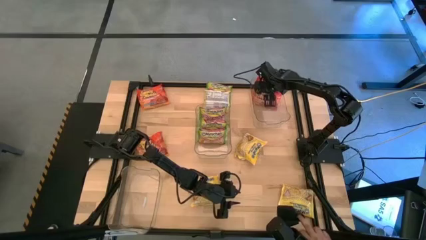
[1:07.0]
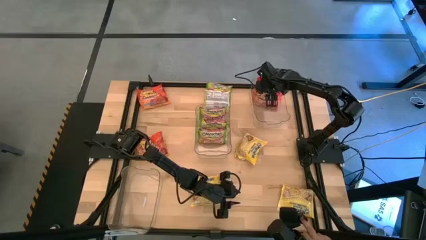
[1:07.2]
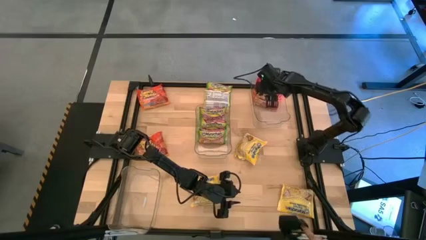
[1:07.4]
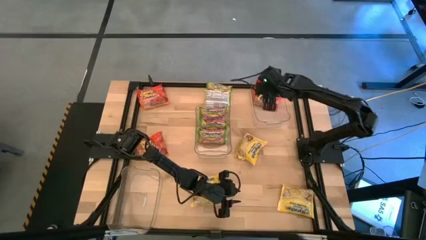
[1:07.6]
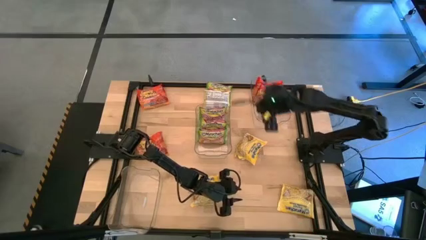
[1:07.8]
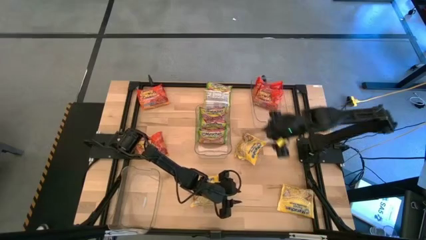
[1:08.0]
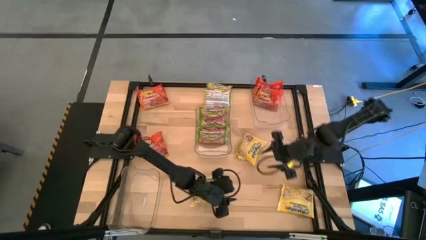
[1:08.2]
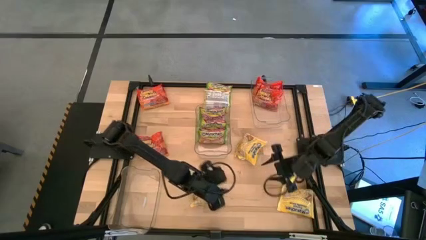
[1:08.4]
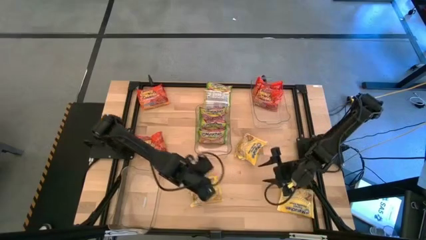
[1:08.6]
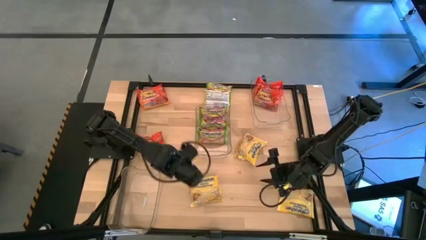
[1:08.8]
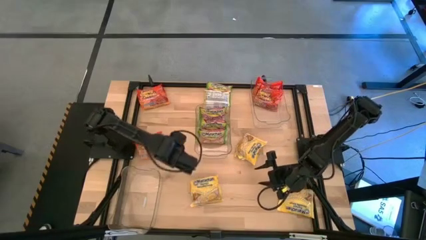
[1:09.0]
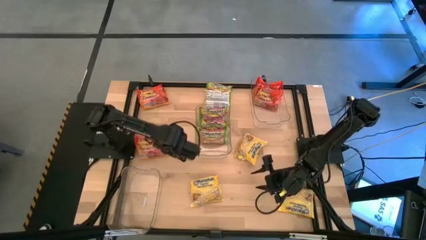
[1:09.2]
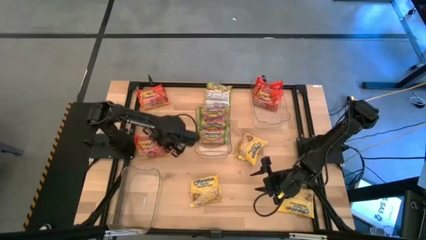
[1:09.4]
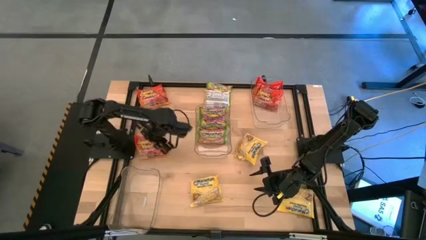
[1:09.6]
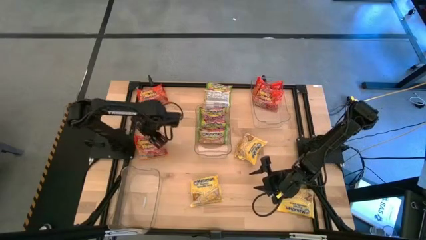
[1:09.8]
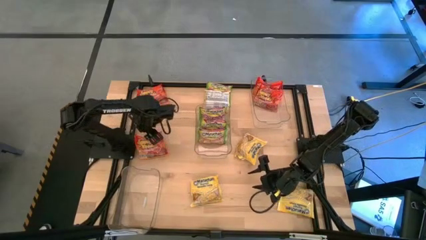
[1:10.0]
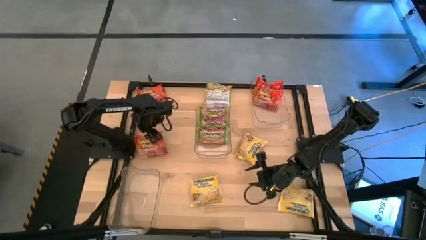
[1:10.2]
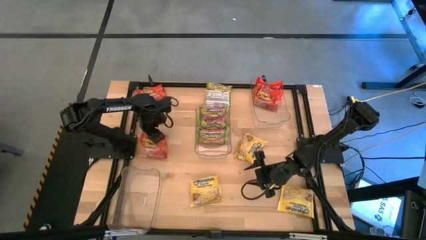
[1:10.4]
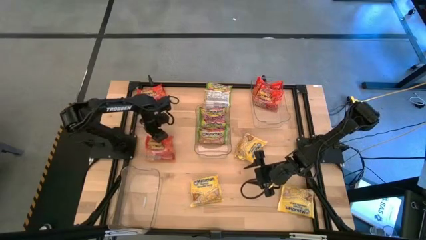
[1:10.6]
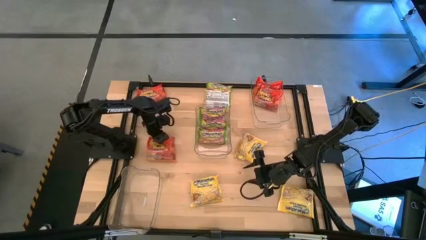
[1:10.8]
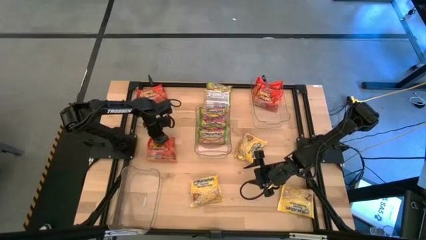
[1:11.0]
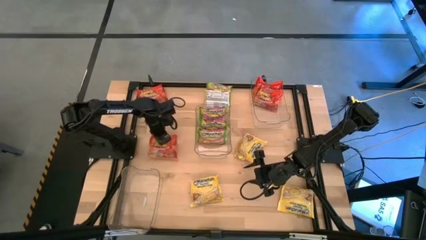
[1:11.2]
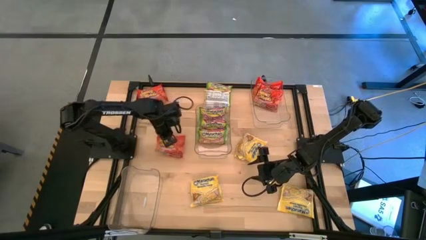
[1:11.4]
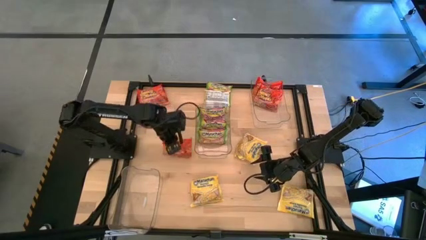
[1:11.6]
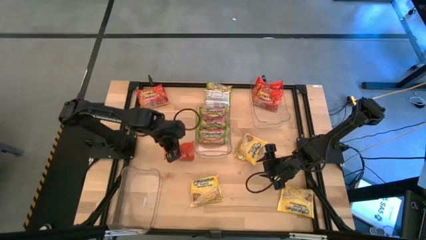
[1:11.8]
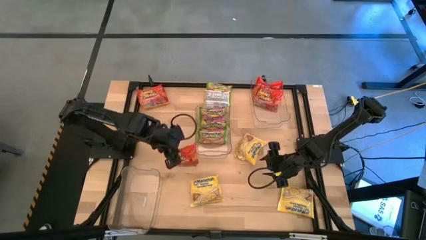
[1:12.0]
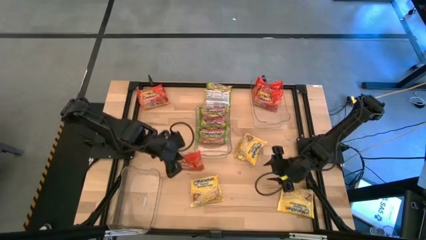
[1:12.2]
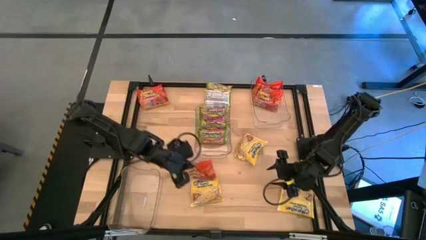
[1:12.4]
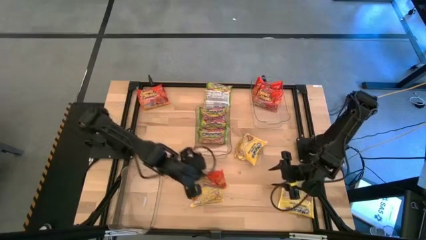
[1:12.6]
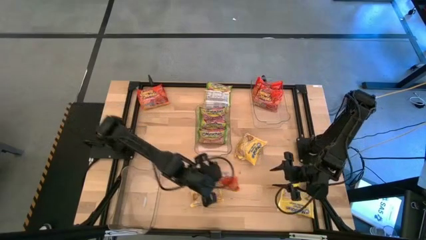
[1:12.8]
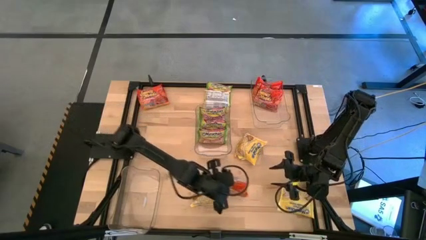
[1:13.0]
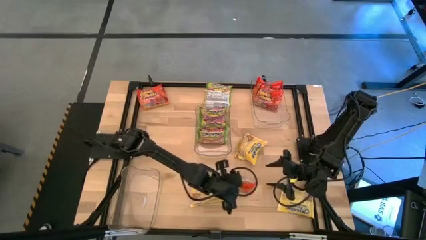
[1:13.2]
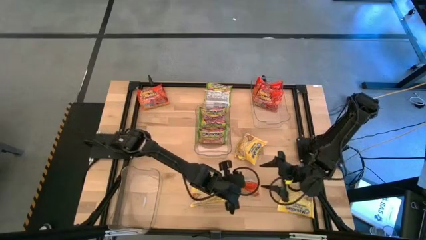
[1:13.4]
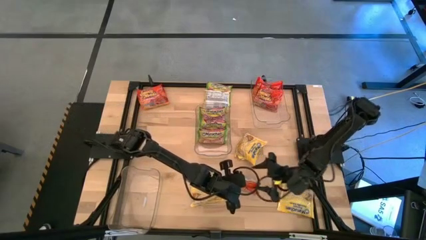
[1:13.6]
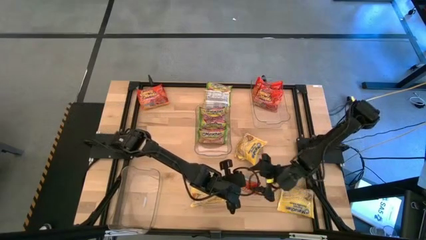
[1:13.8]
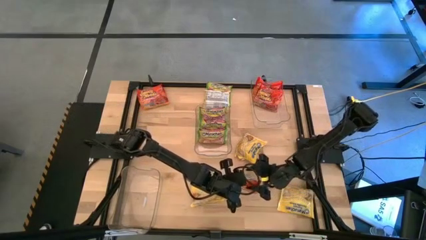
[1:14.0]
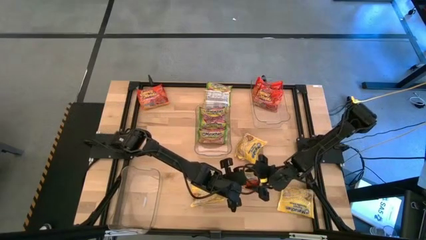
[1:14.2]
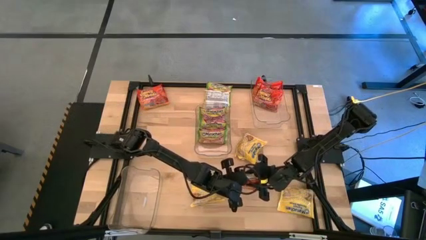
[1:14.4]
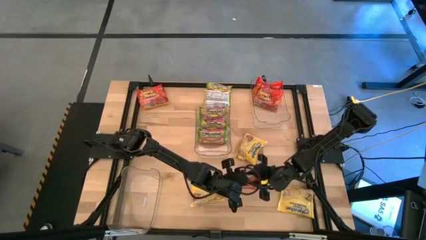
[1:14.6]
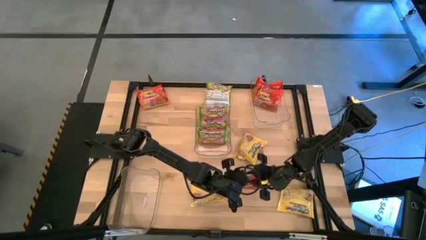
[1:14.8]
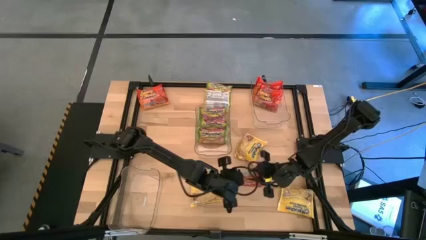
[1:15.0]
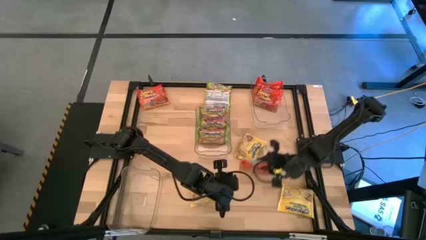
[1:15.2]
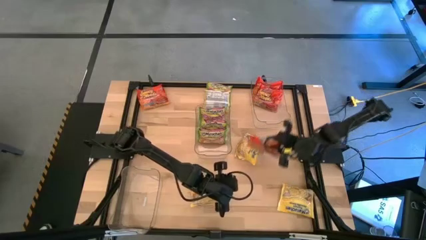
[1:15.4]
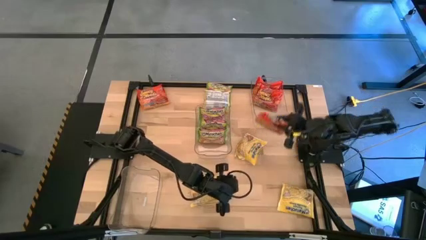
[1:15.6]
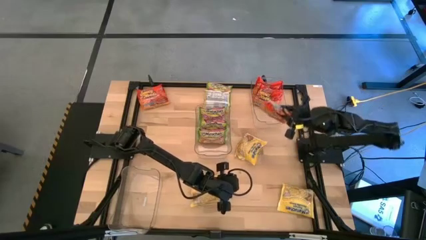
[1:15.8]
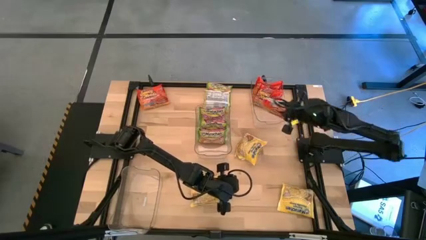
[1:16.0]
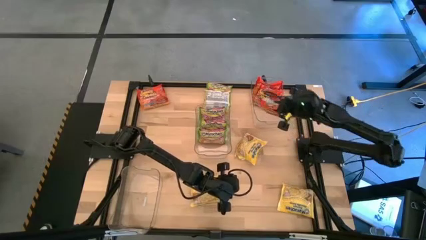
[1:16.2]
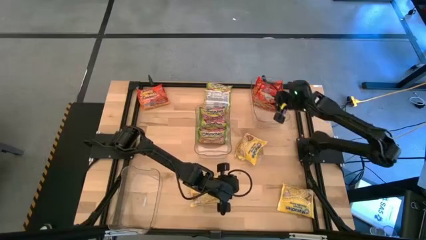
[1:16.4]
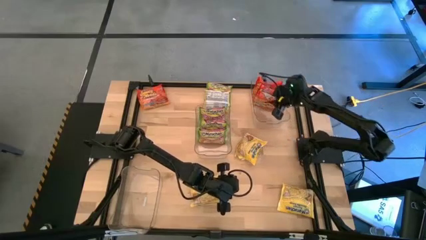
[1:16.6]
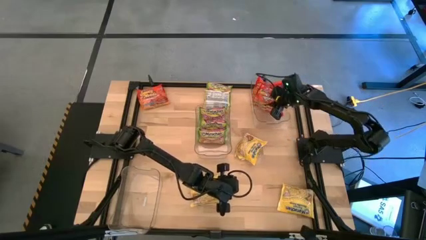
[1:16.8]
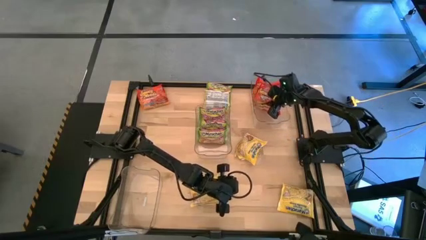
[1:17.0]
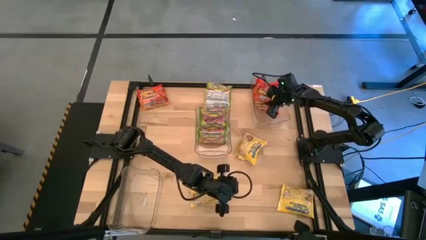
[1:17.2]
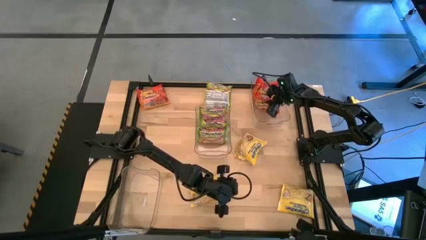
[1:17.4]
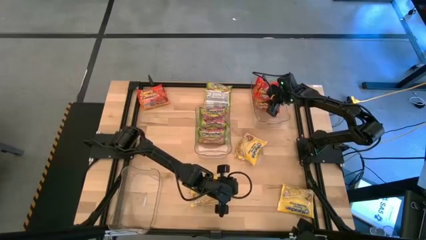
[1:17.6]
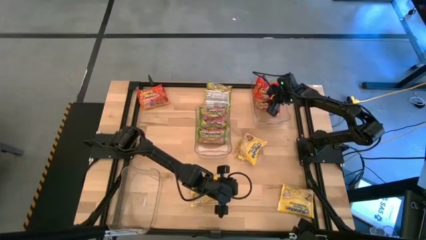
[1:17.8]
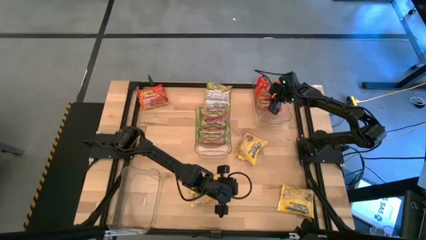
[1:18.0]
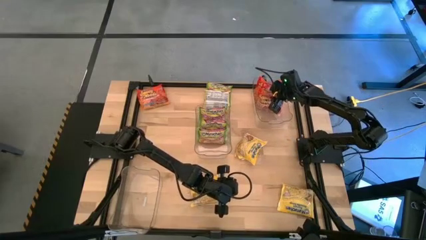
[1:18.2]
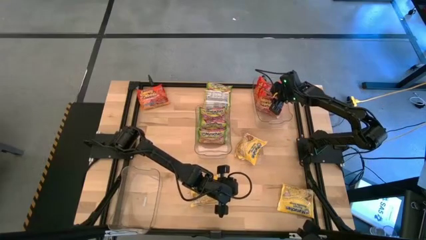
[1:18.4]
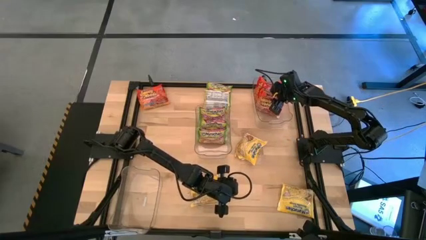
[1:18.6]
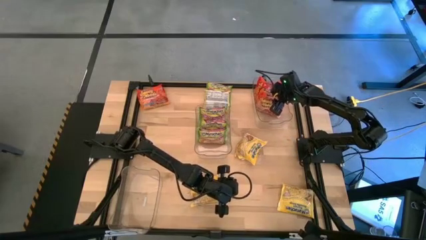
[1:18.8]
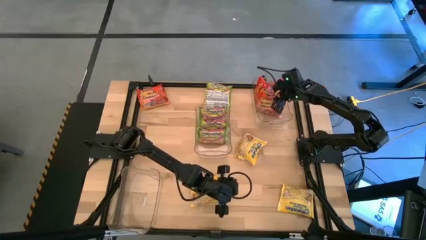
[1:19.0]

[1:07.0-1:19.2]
Task: Sort Maruchan noodles
Put the bottom orange noodle pack into the top right transparent bin
